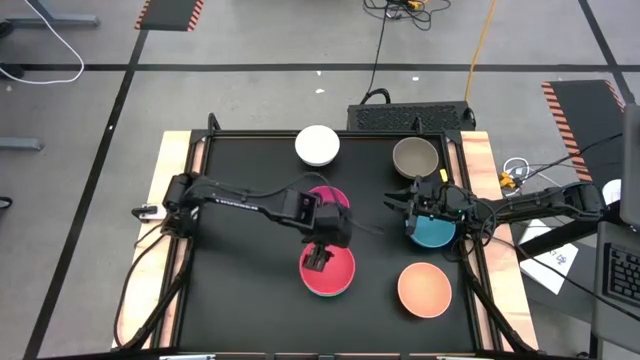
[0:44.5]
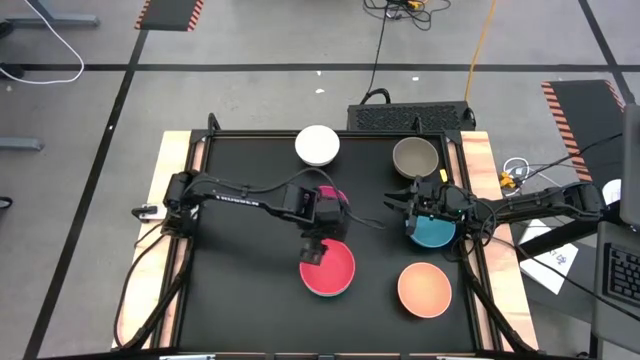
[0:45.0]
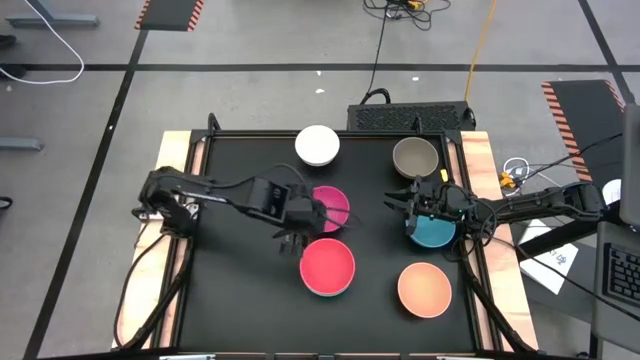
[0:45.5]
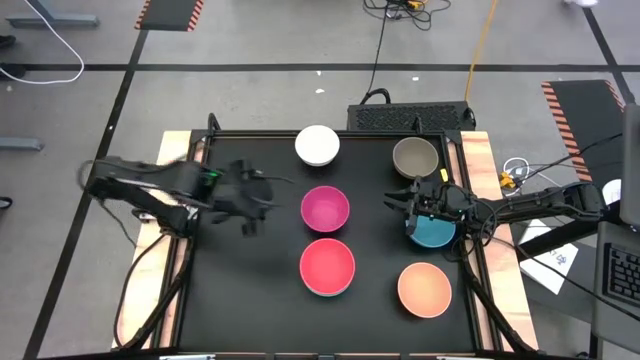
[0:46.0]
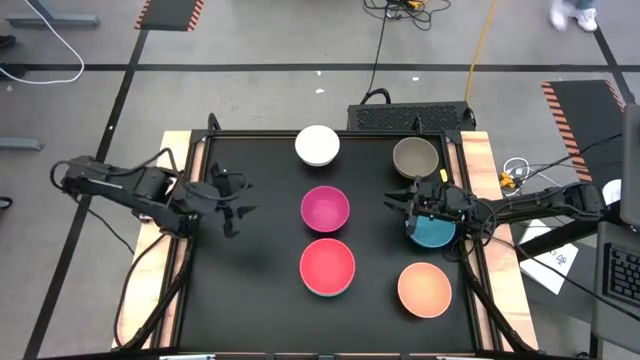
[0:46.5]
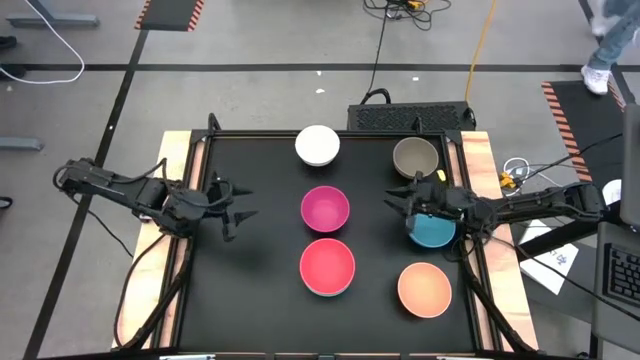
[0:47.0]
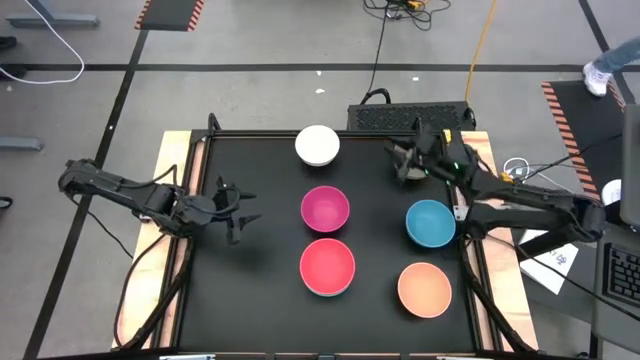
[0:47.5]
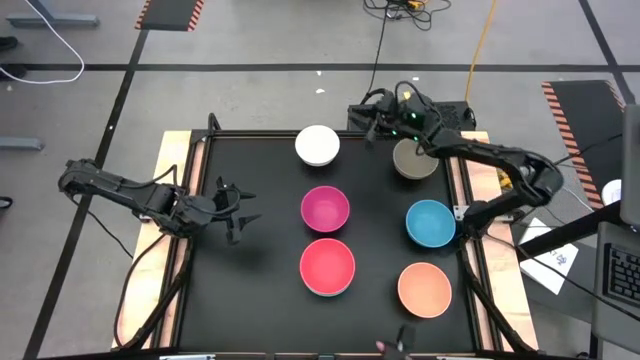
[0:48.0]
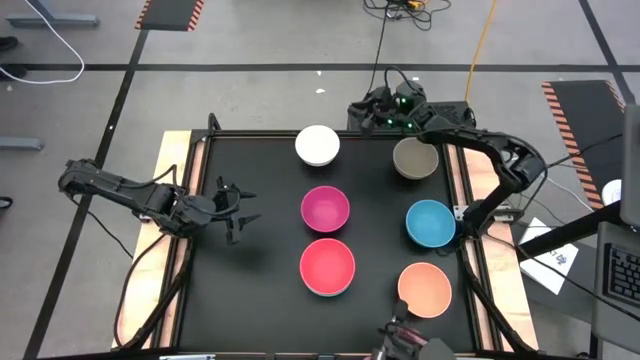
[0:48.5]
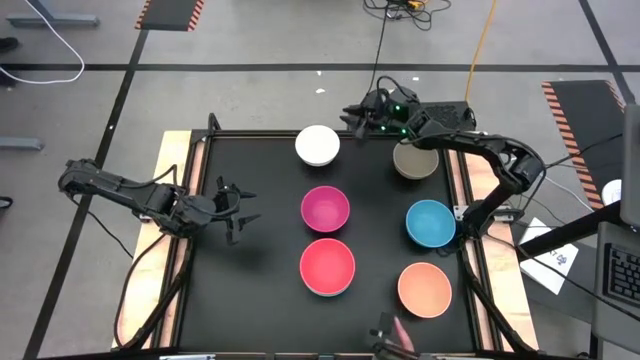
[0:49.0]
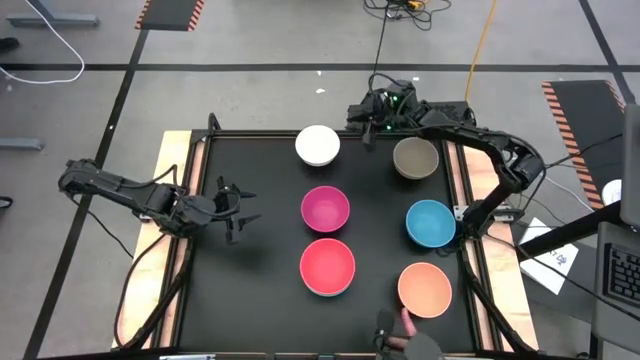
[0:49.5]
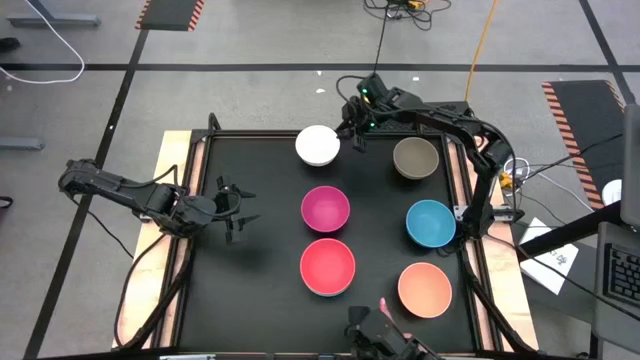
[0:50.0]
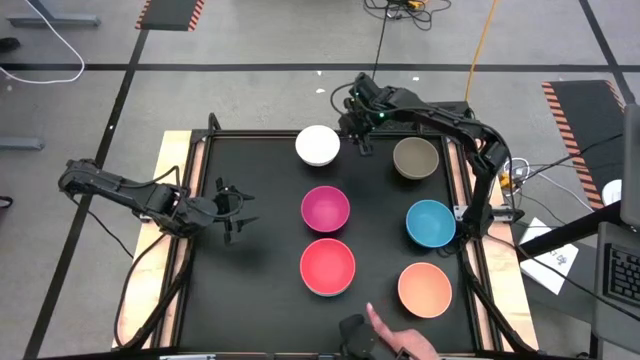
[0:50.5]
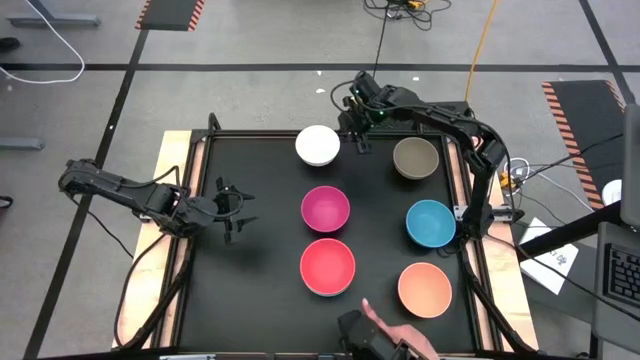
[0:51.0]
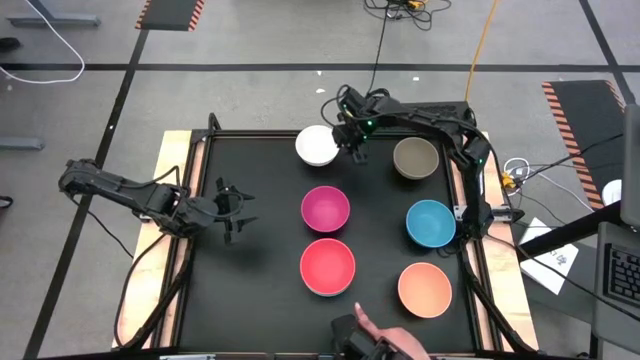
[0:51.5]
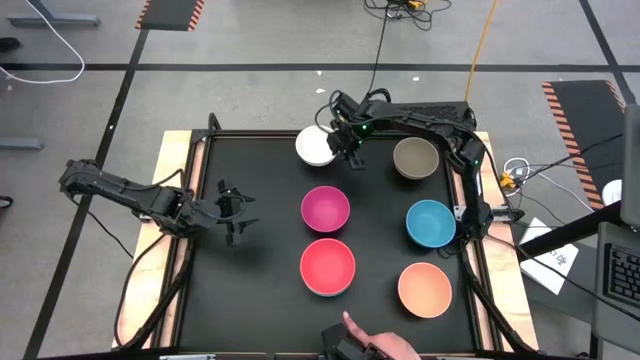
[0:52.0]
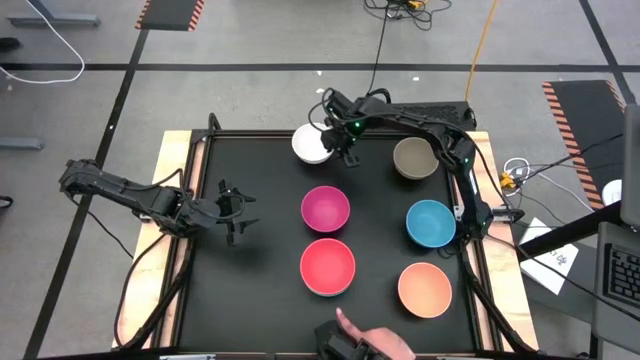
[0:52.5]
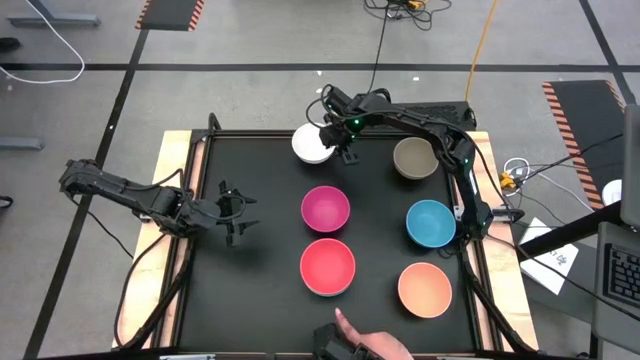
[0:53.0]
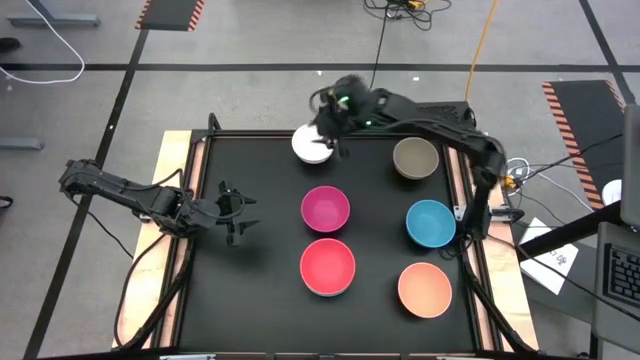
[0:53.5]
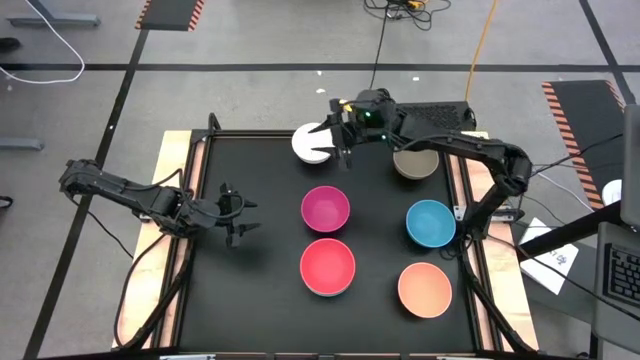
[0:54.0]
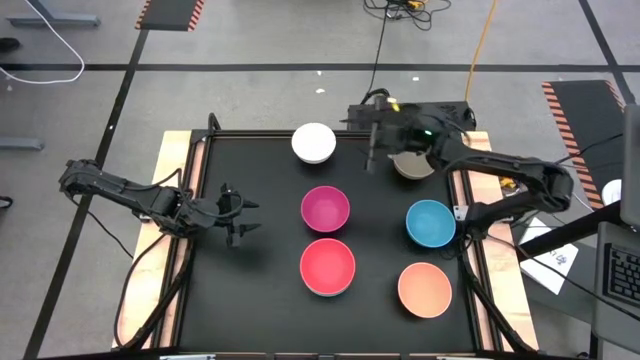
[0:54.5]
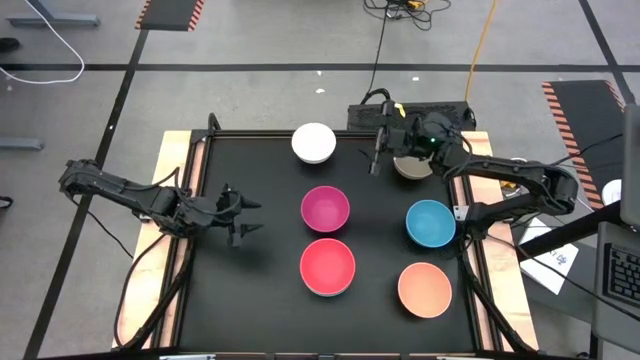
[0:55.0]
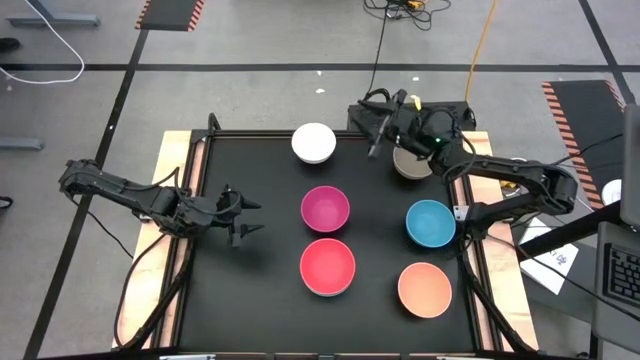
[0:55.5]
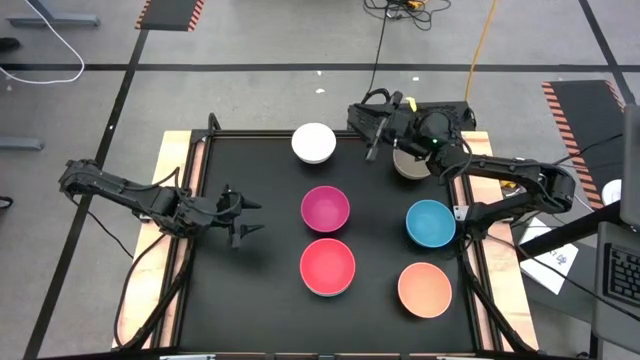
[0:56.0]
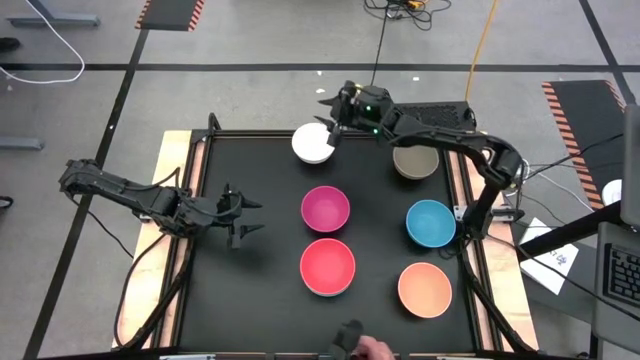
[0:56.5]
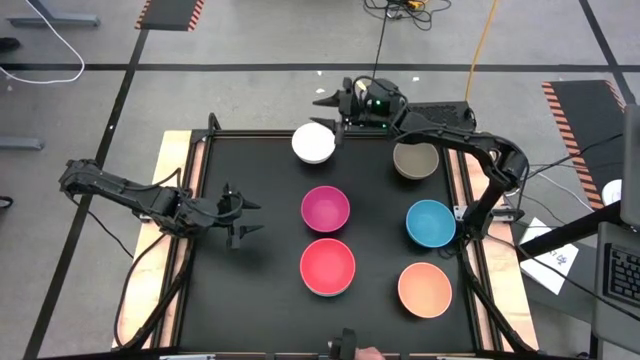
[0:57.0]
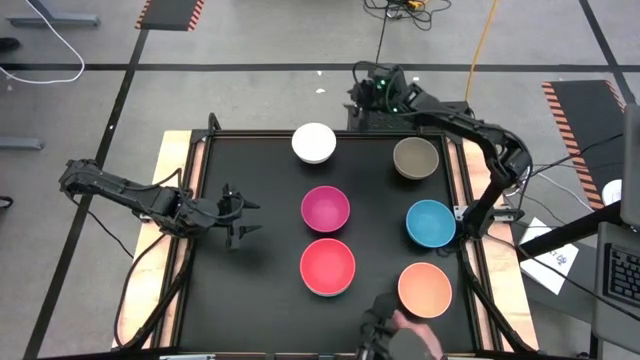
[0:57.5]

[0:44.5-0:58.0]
Task: Nest bowls inside each other
Stack the white bowl on the orange bowl

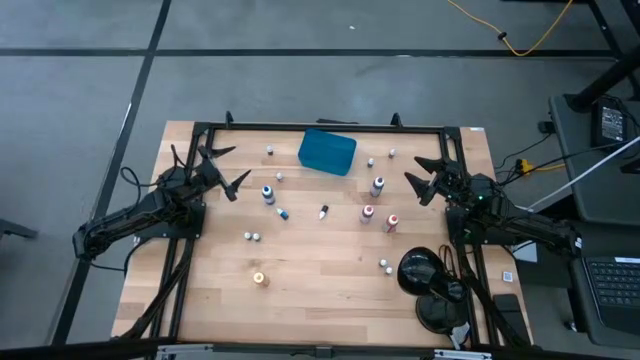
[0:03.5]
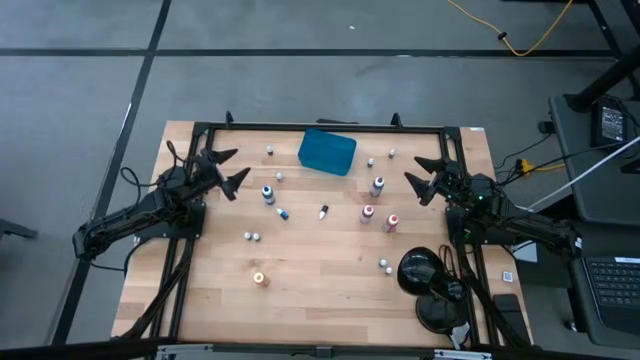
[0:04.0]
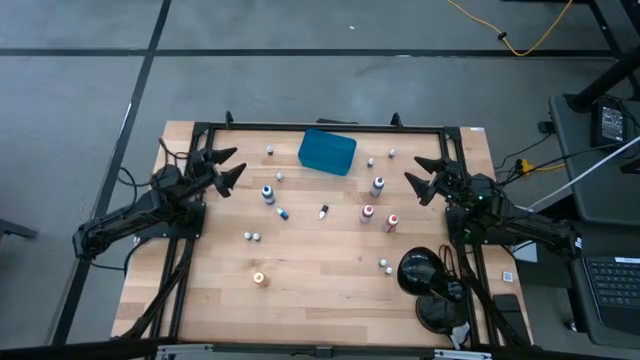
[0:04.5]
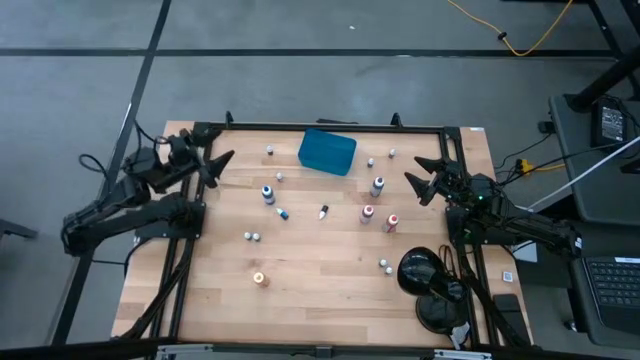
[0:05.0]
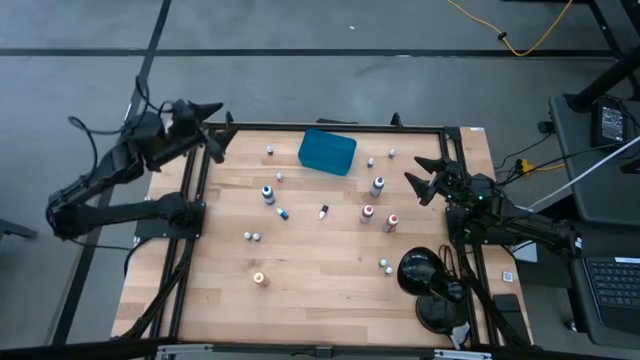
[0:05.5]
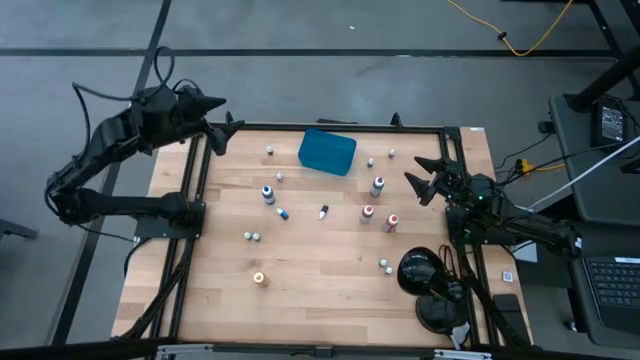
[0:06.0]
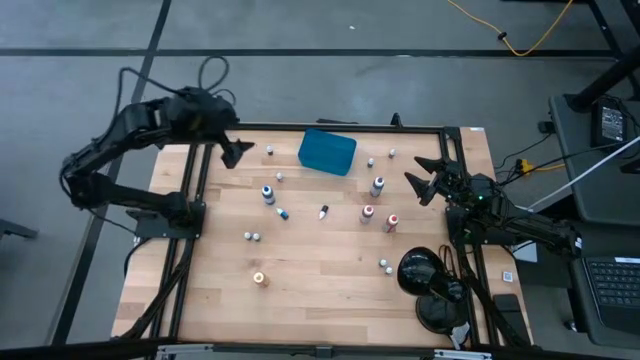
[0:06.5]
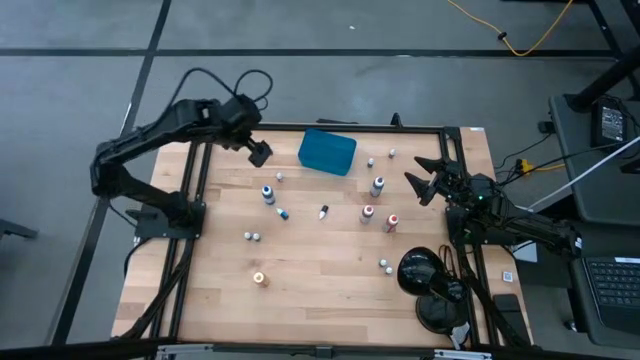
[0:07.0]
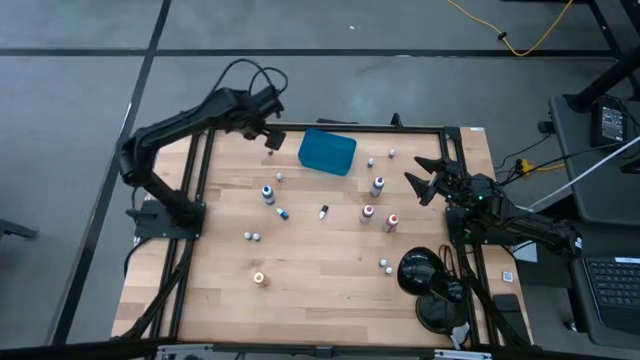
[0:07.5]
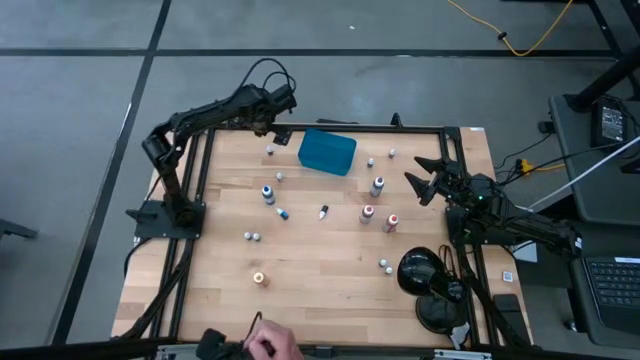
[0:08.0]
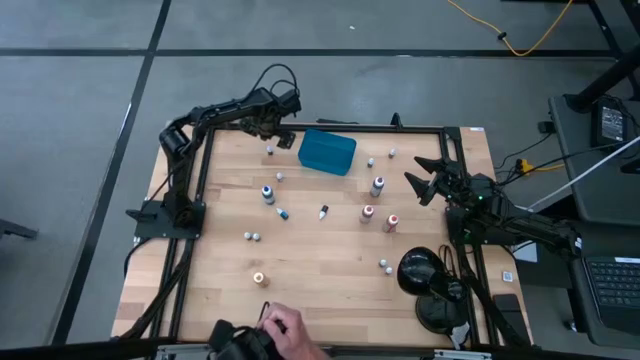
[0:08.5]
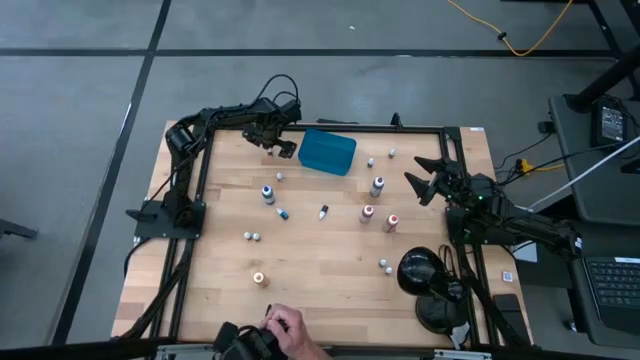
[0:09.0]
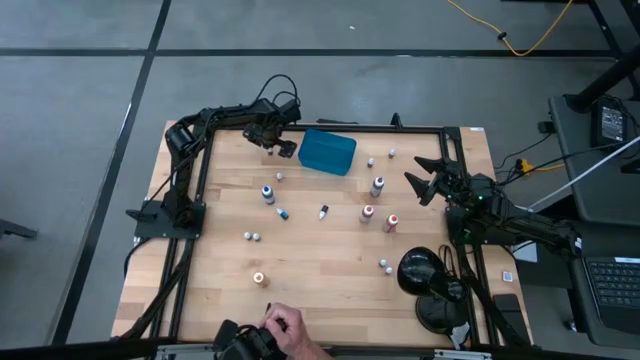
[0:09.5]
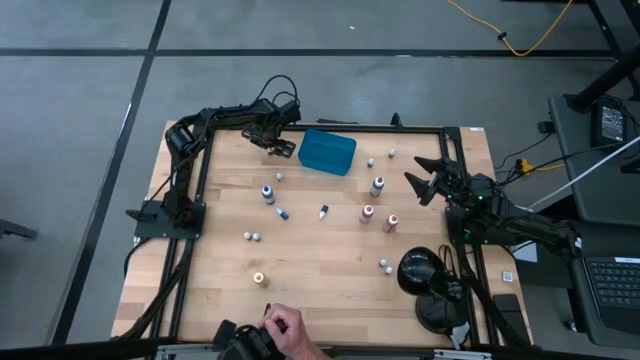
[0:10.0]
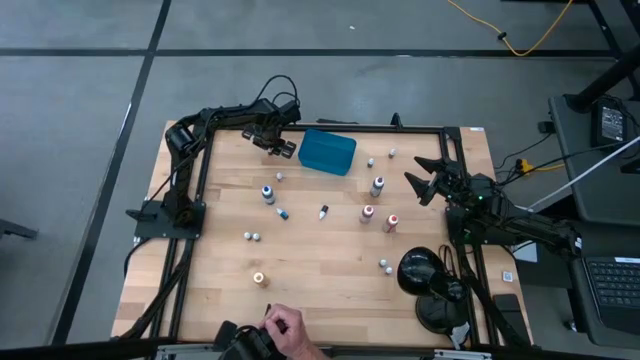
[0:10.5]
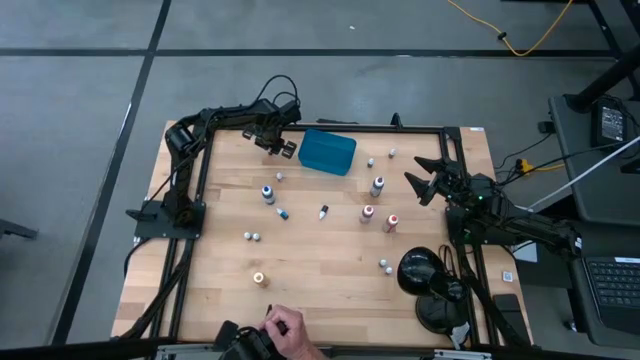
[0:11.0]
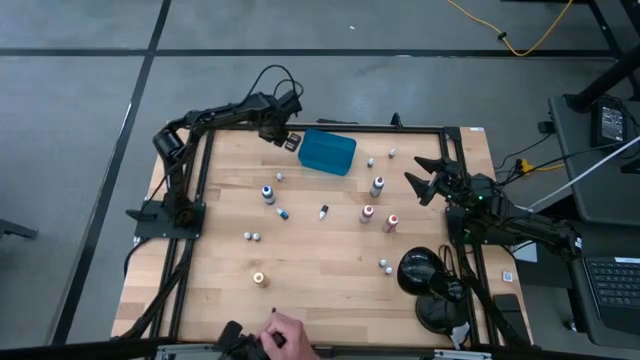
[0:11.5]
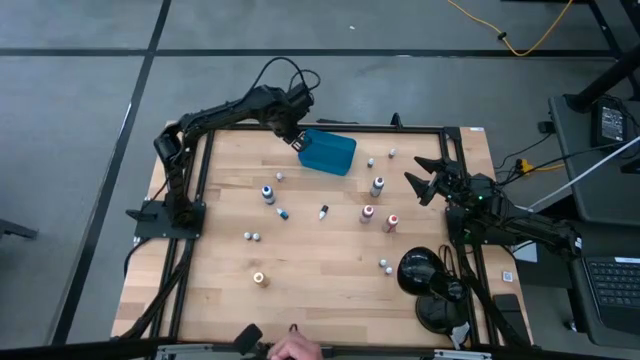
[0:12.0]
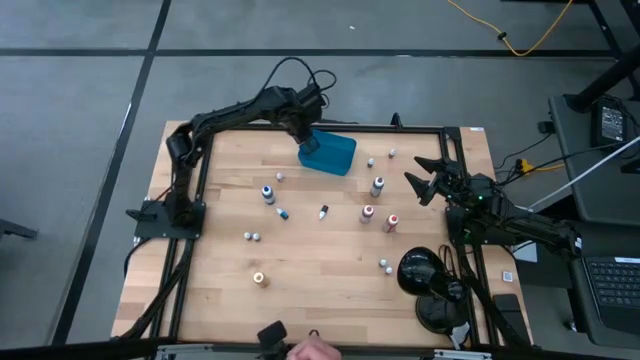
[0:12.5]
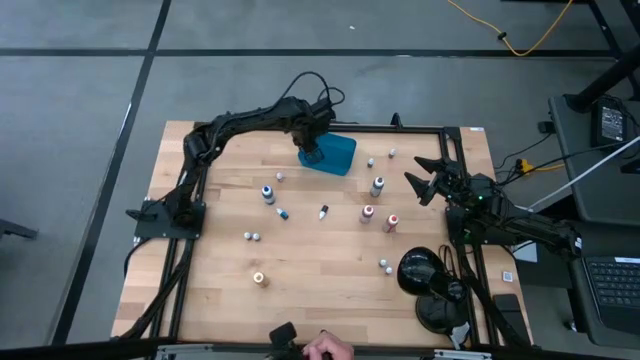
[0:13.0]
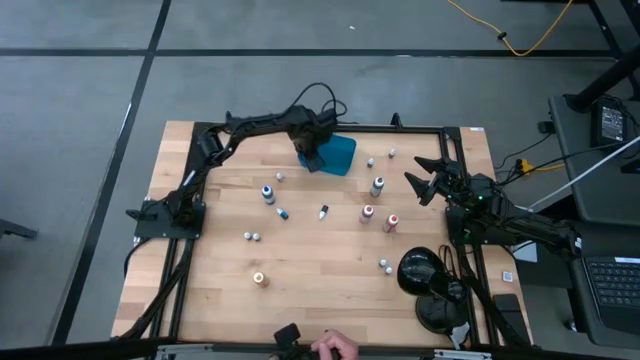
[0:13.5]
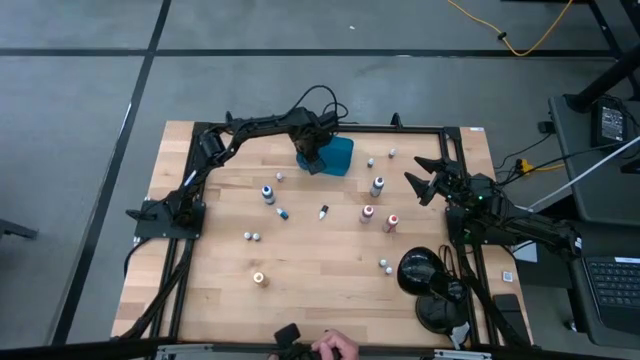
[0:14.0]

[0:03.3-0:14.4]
Task: Pick & Place food coloring
Put the small purple food coloring bottle into the blue bin
